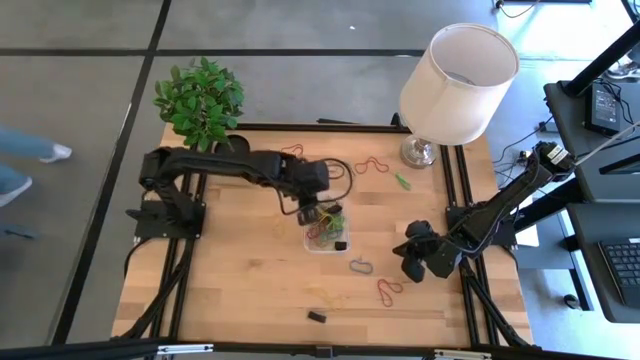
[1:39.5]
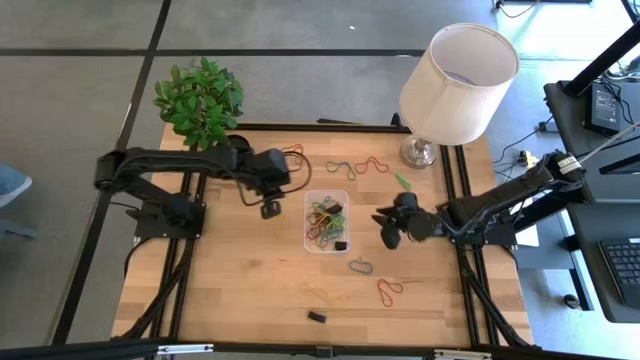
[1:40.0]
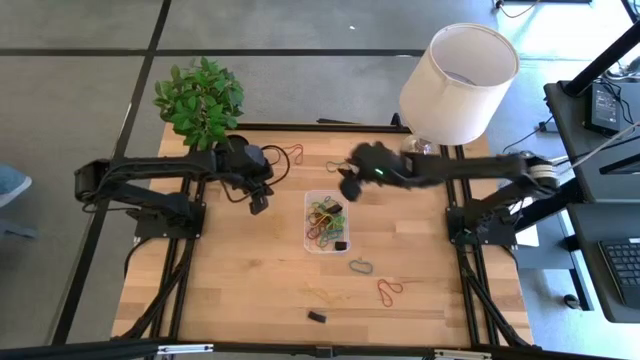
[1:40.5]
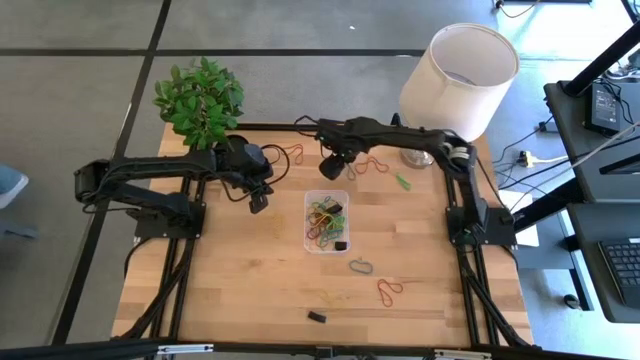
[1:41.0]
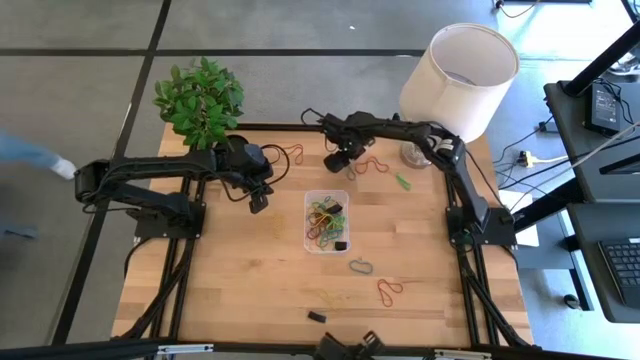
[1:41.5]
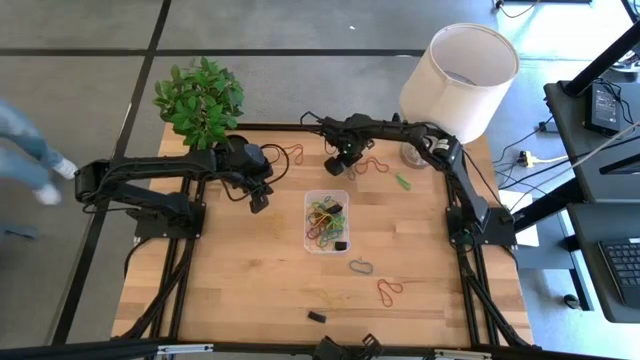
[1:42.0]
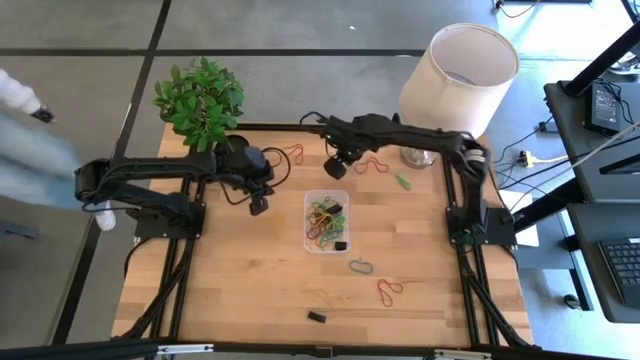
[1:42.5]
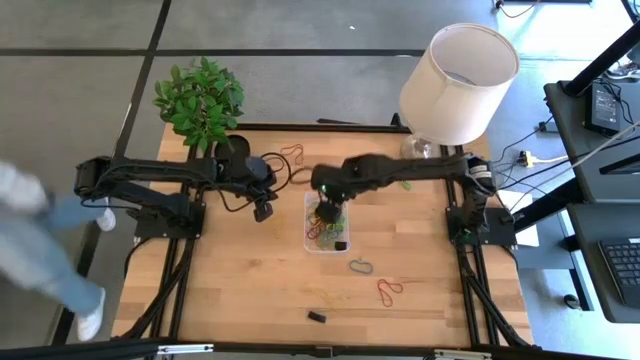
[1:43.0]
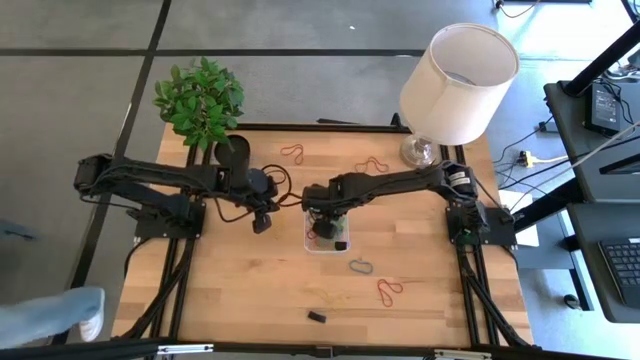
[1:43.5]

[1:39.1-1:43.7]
Task: Pick and place rubber bands into bin
Put the blue rubber band into the transparent container

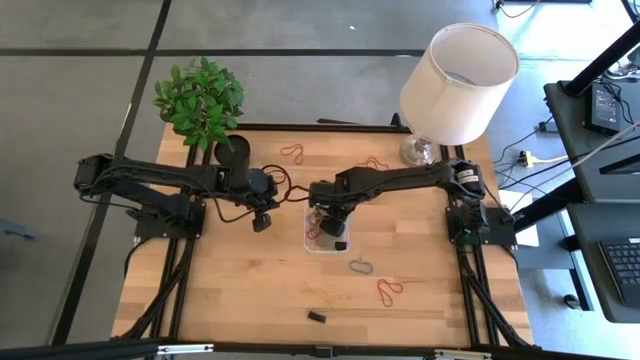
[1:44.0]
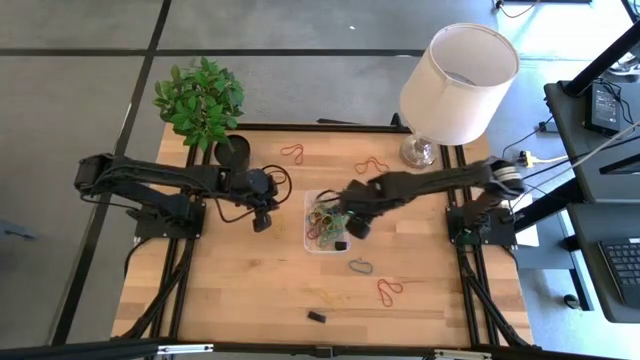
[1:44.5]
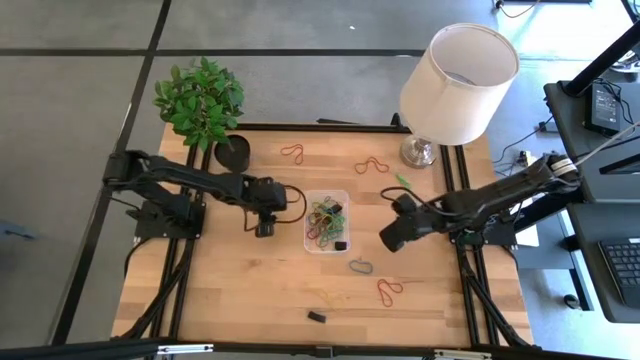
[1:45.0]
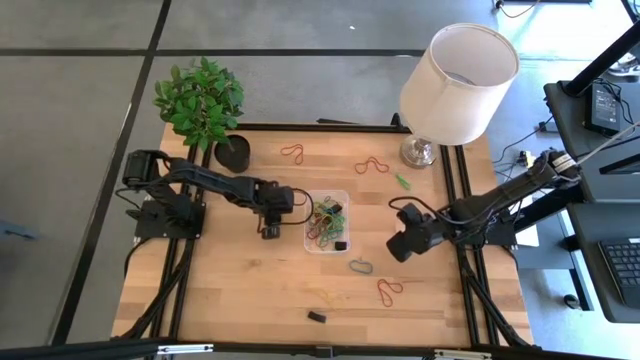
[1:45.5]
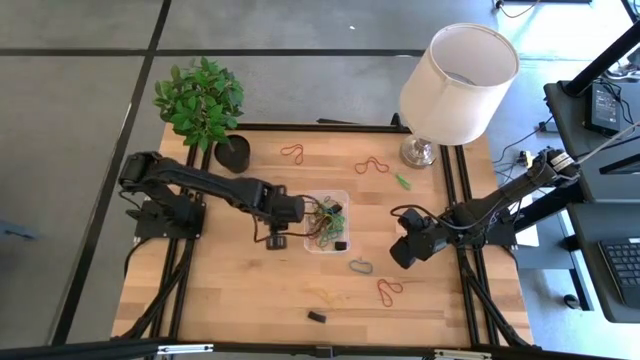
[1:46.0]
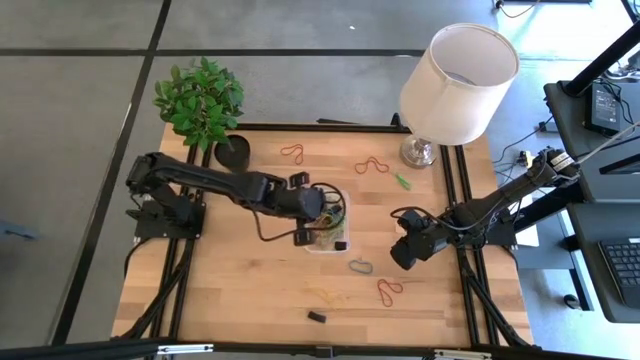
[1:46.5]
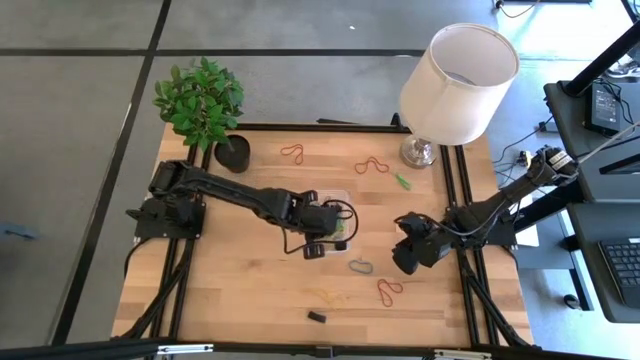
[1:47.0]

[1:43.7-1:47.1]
Put the yellow rubber band into the transparent container

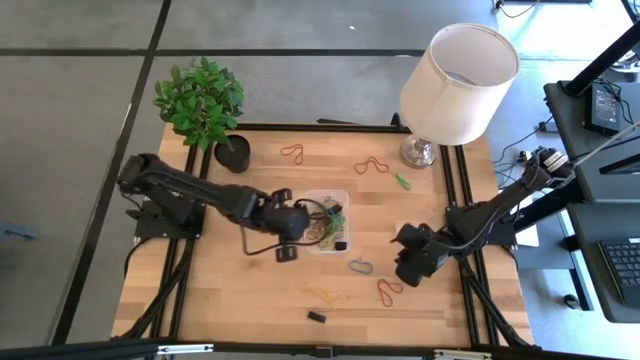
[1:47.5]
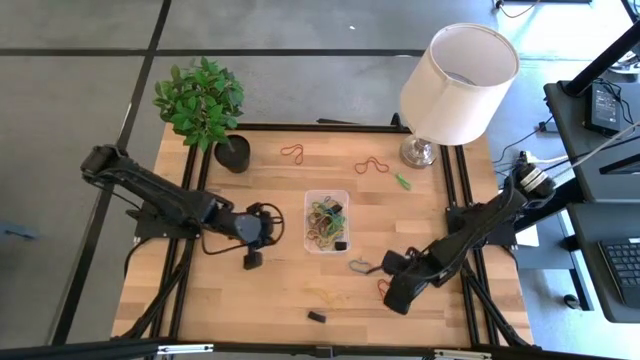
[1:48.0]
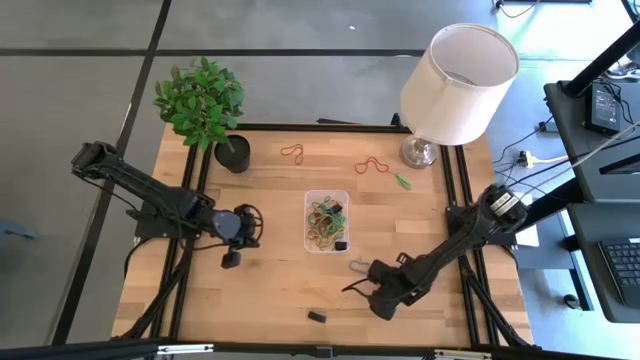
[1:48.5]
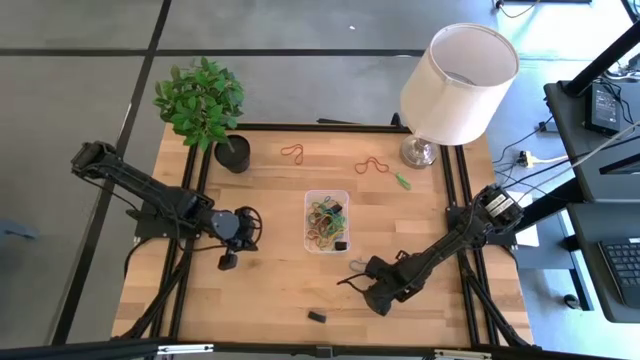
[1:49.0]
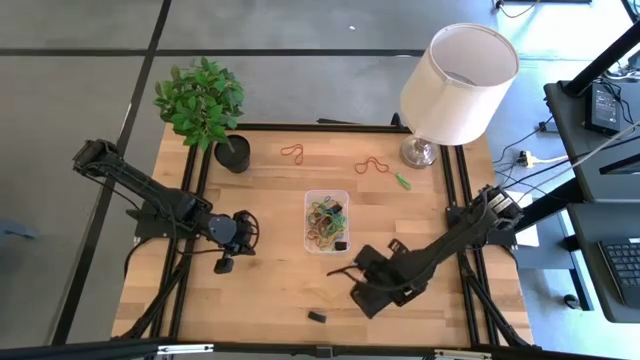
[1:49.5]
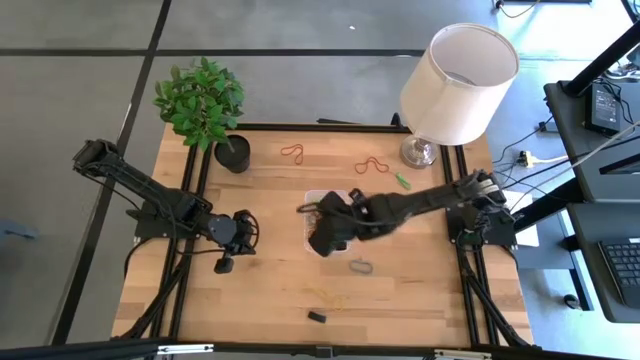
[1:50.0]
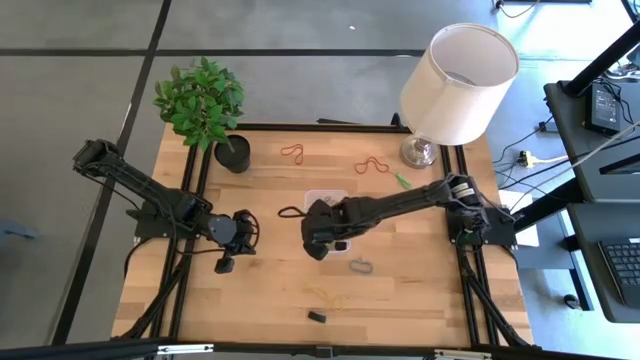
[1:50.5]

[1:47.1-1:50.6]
Put the red rubber band into the transparent container

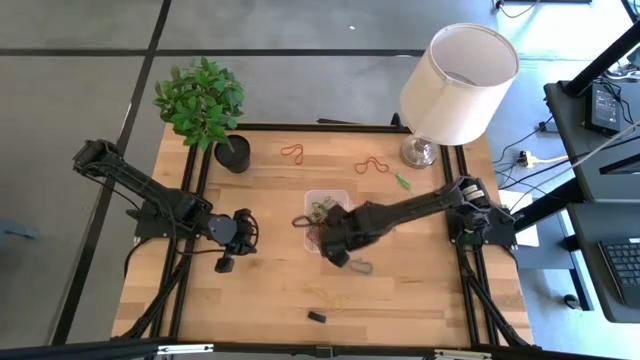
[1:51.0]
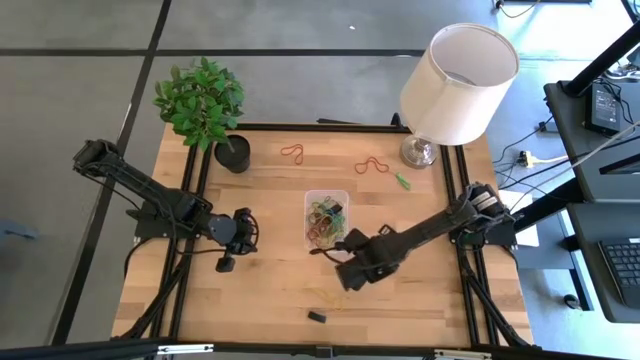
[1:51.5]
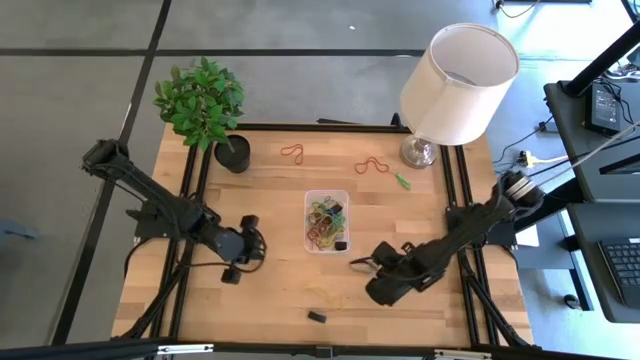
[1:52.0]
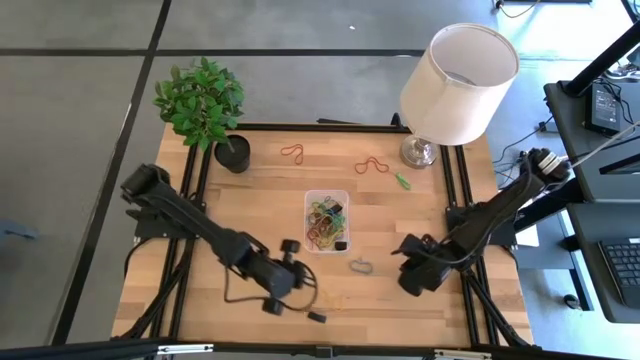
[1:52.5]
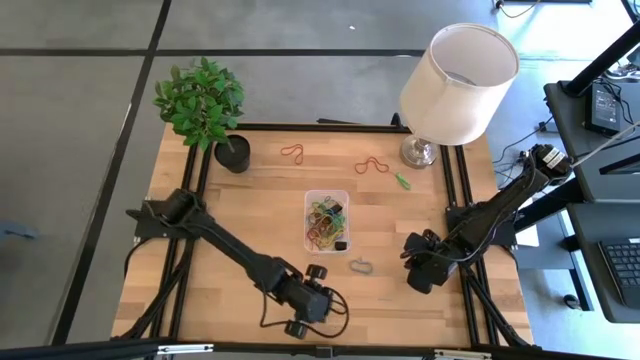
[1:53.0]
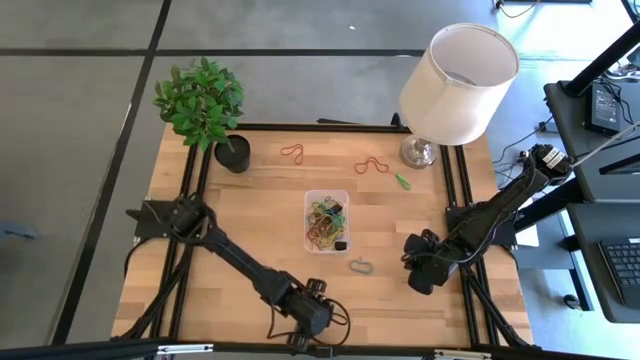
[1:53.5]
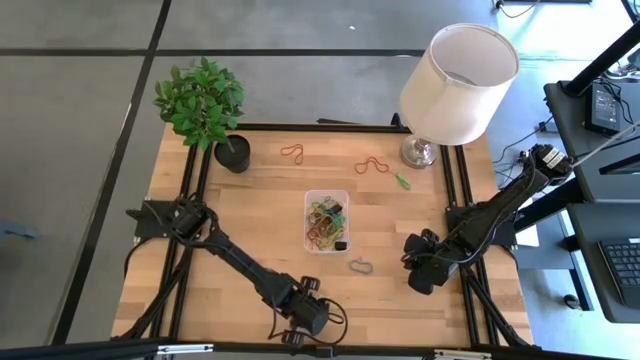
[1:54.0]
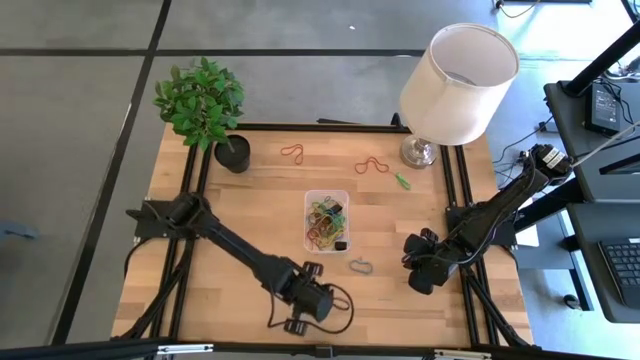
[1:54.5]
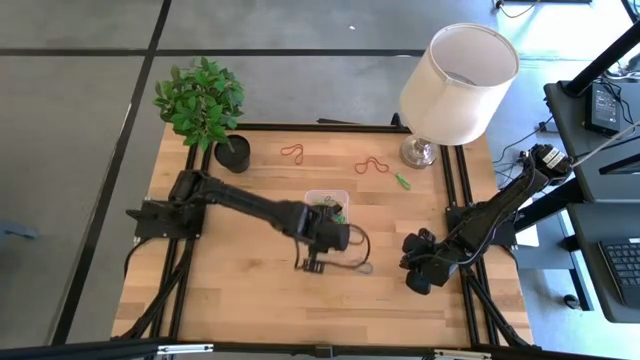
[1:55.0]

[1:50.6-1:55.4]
Put the black rubber band into the transparent container

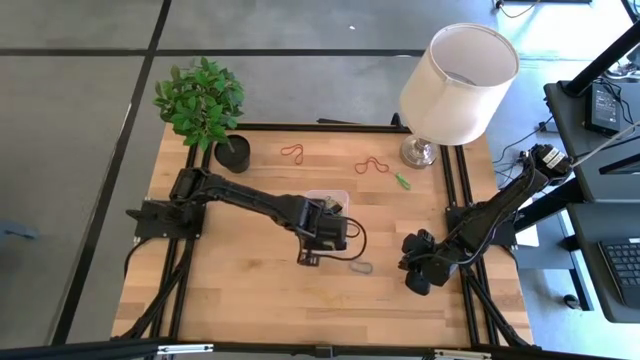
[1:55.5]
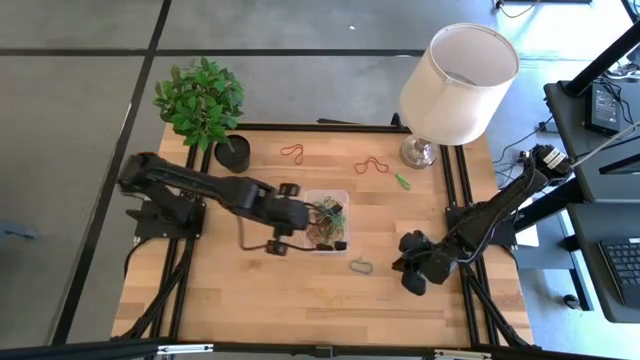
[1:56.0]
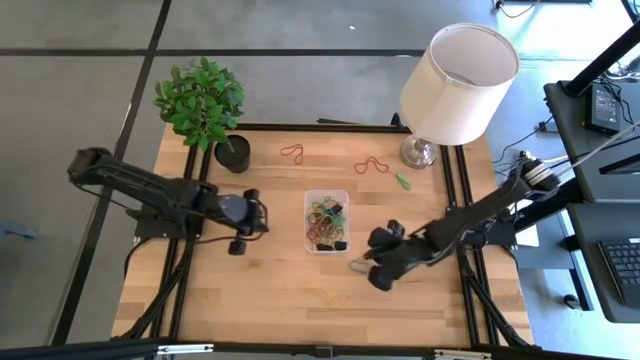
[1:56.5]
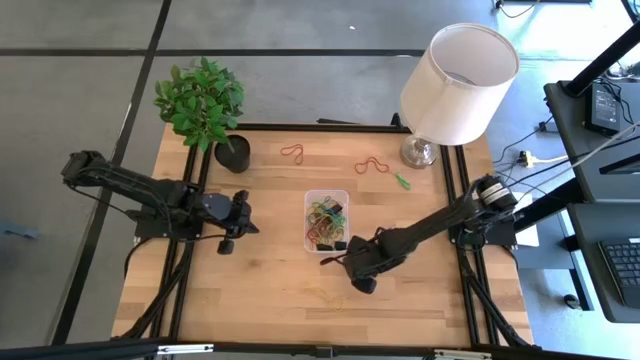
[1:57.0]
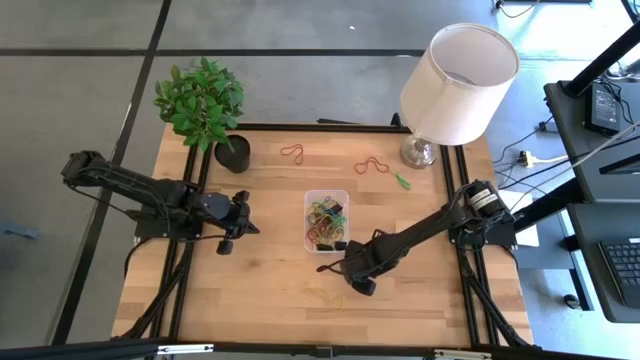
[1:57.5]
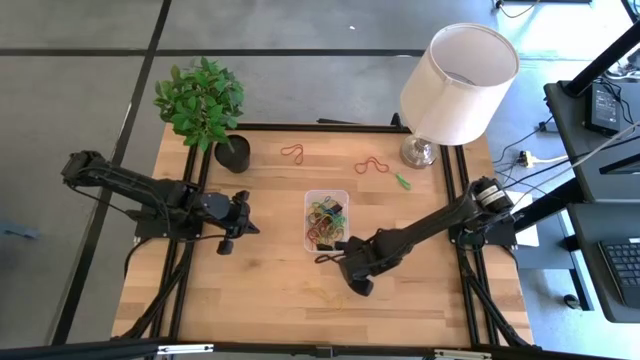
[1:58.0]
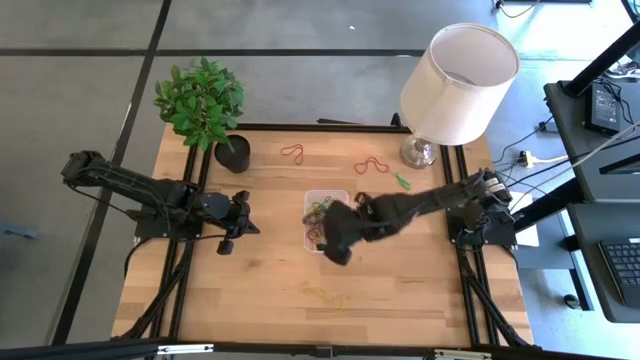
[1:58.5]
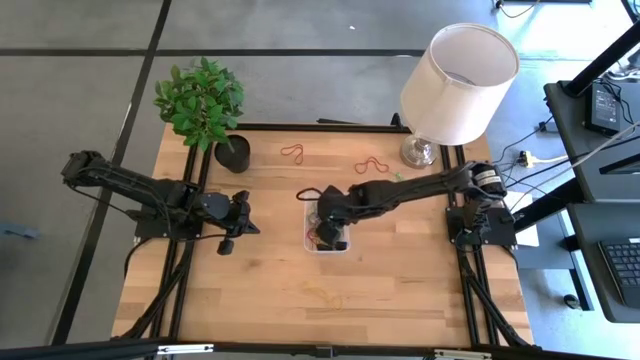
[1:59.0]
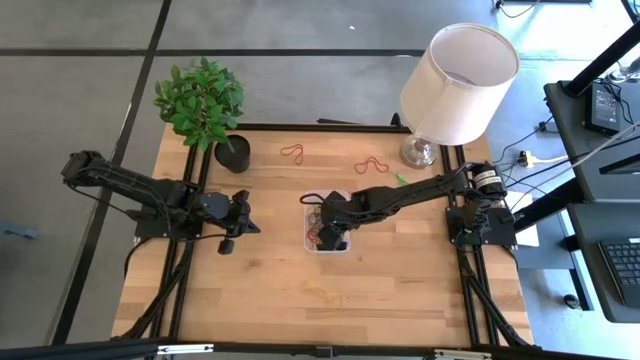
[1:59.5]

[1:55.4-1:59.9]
Put the blue rubber band into the transparent container

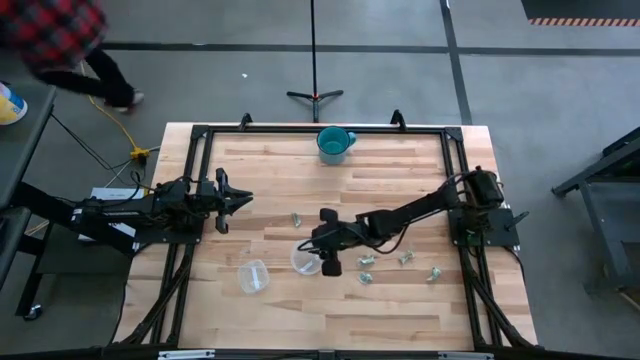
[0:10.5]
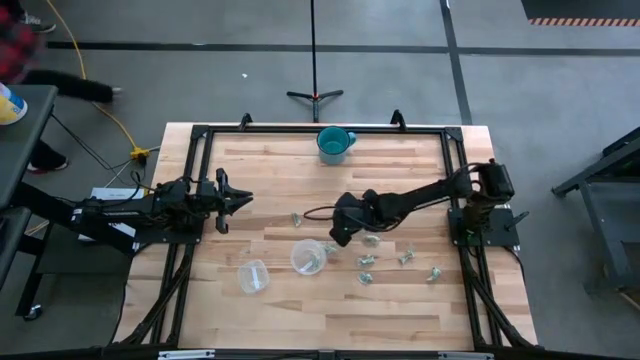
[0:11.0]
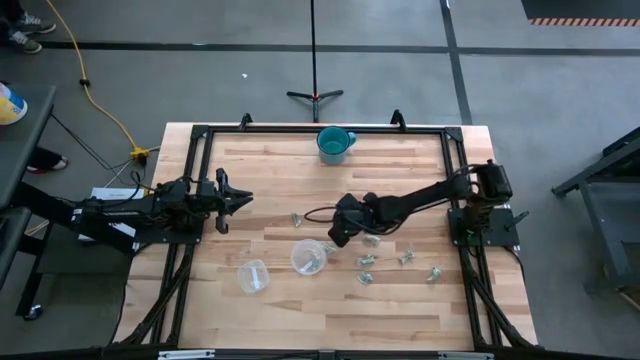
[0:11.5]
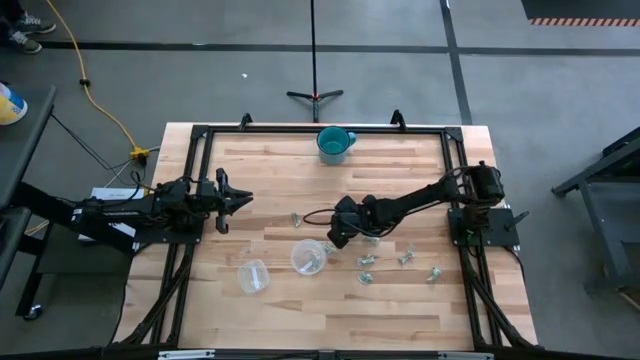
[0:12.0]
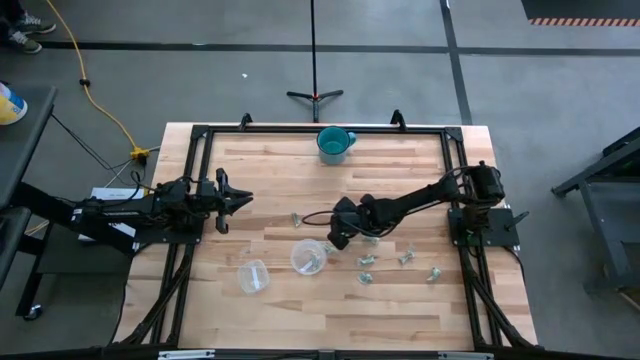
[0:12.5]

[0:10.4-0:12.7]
Task: Pick and place items into bin
Put the stevia packet into the right transparent bin
